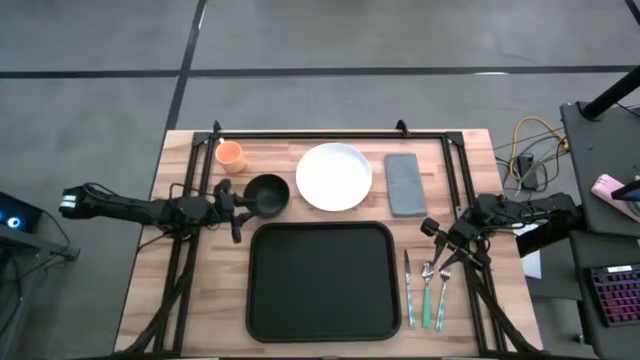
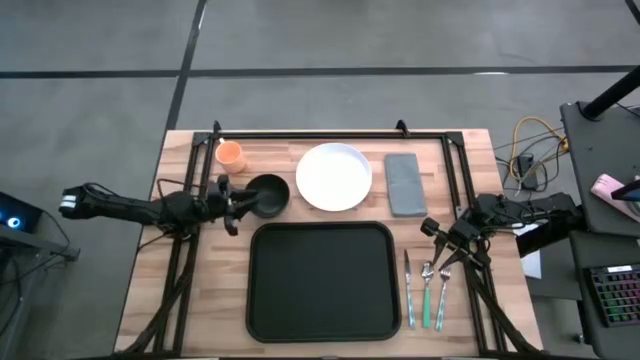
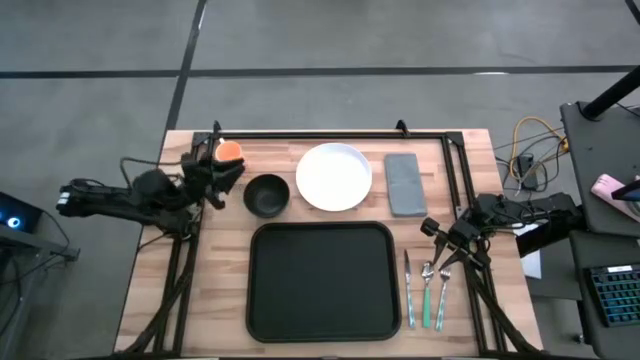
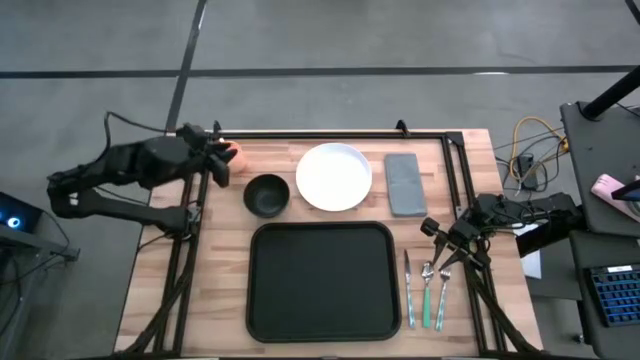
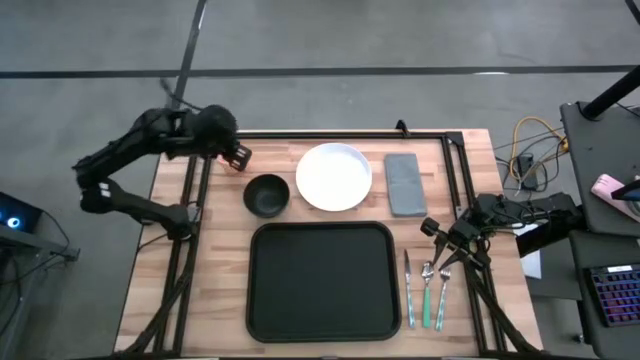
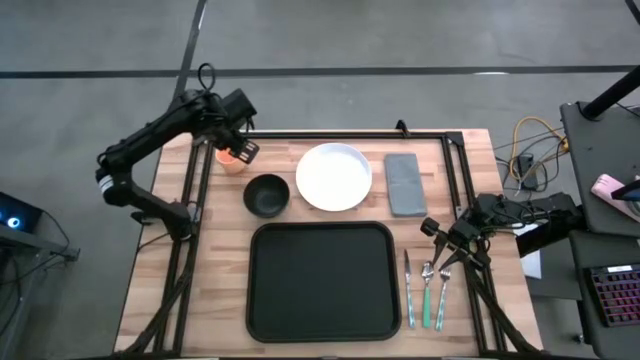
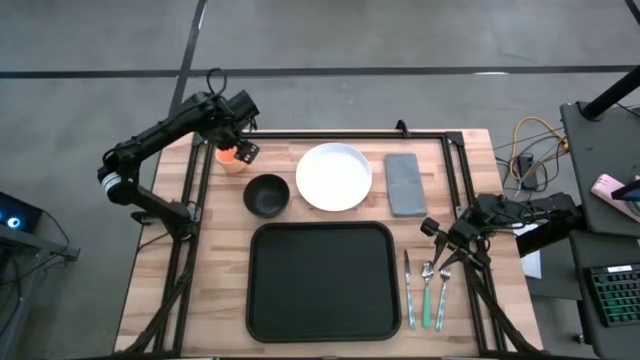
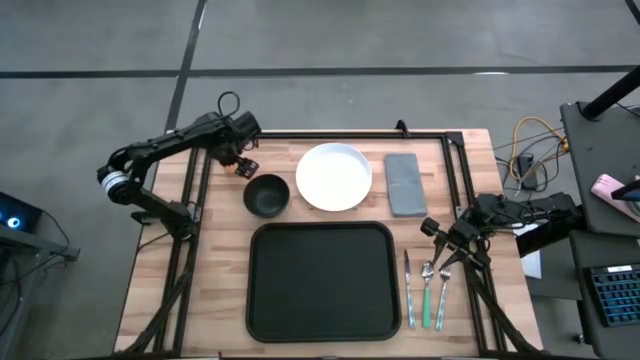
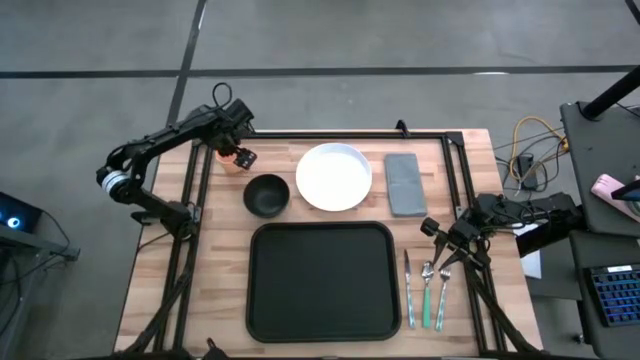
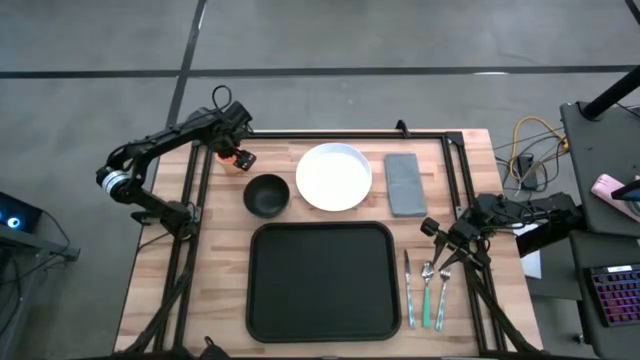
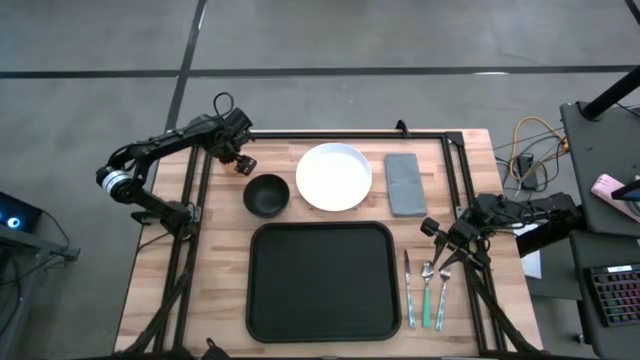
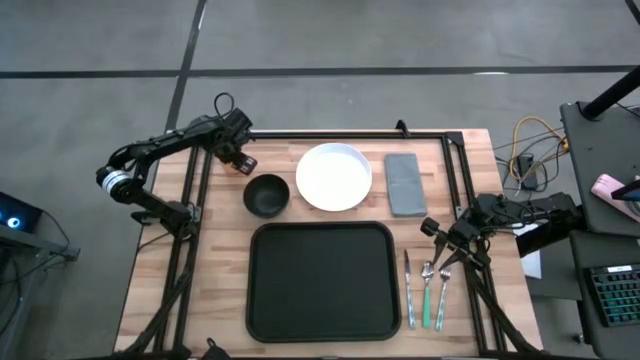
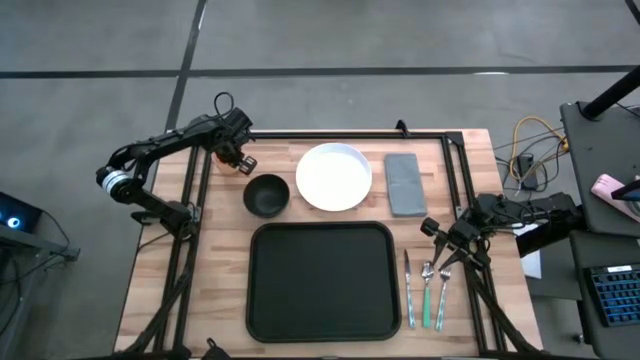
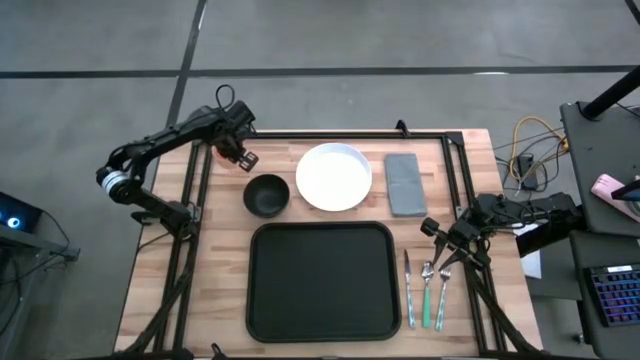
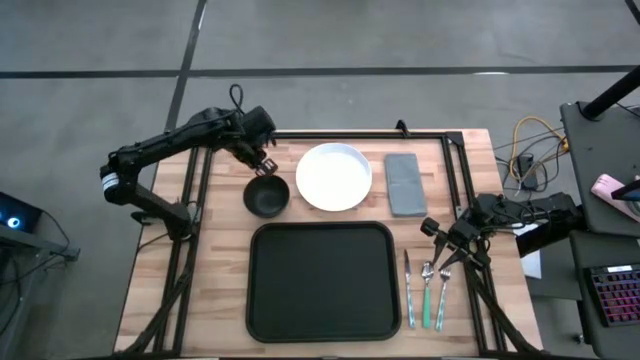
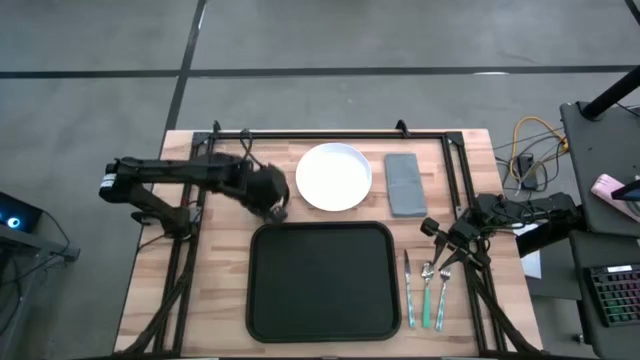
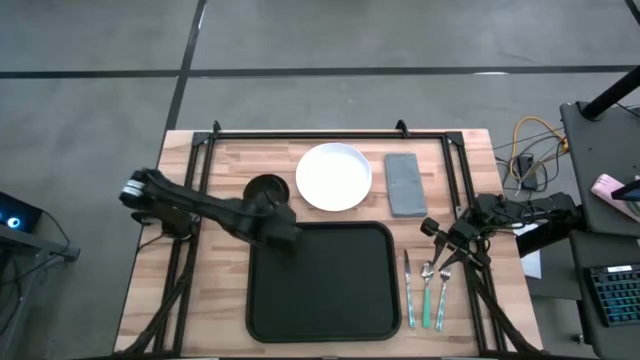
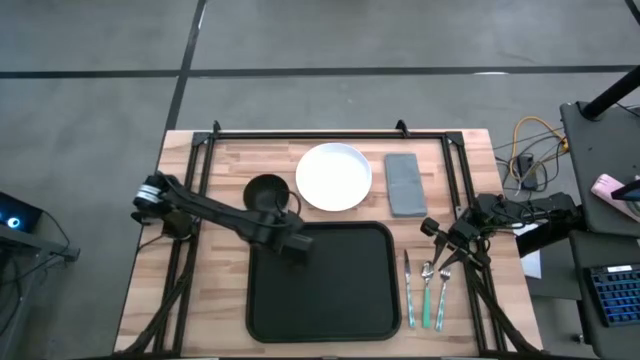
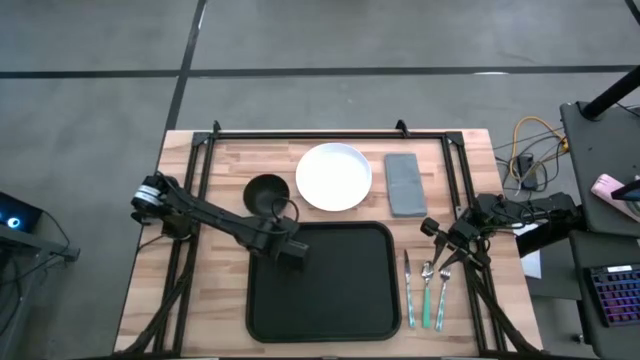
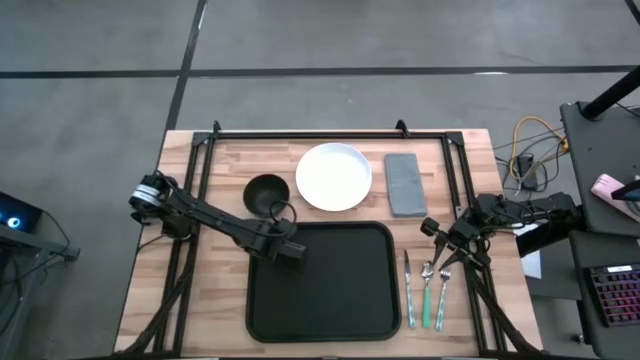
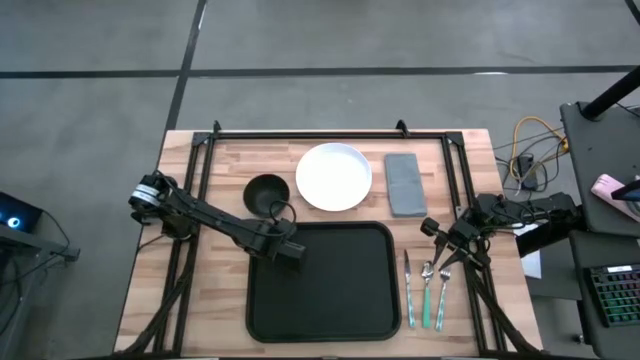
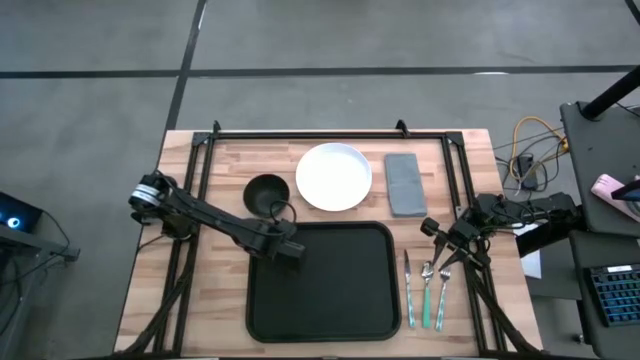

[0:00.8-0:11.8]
Task: Set up tray
Put the orange mug on the top left of the black tray

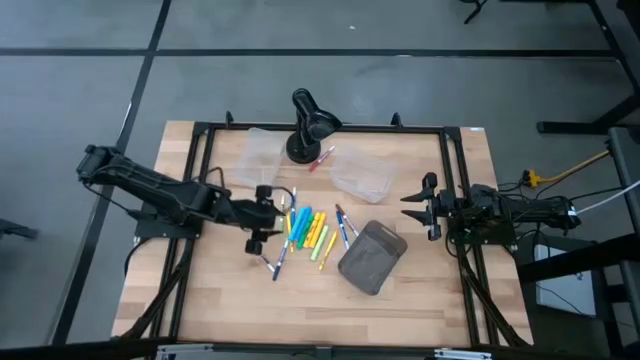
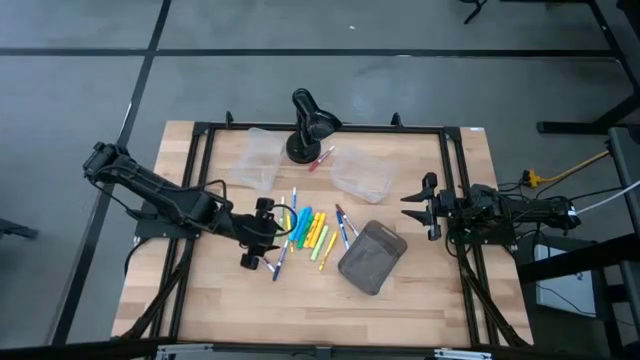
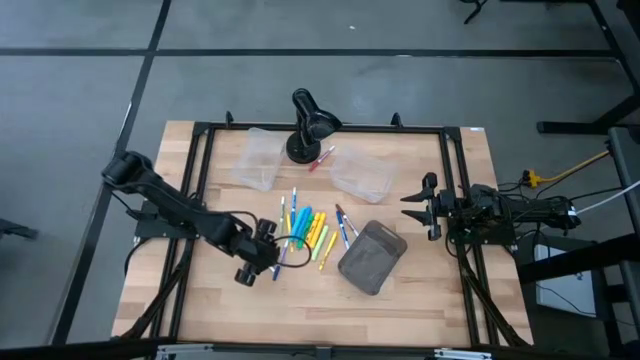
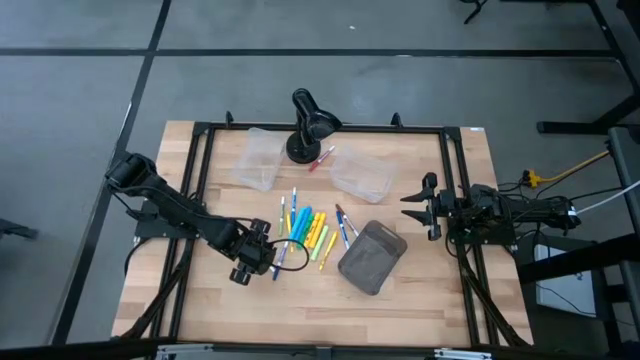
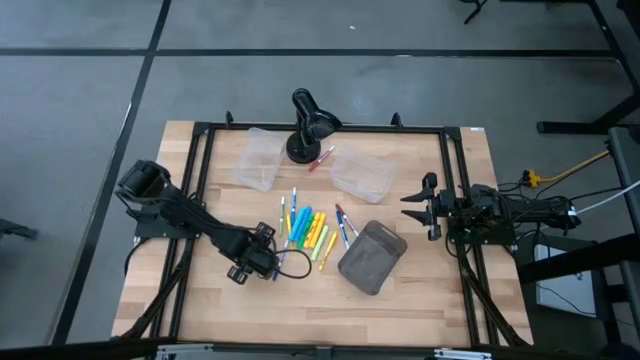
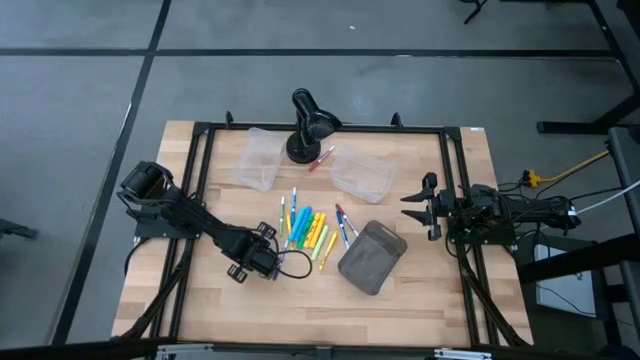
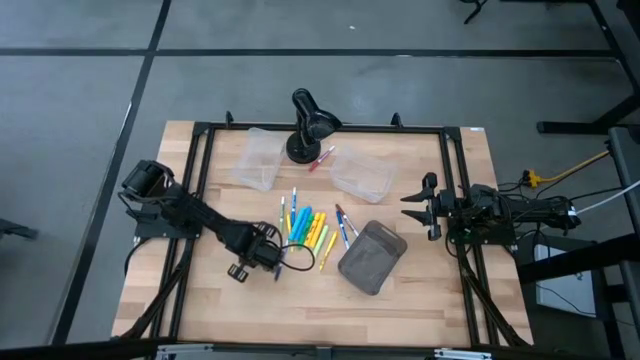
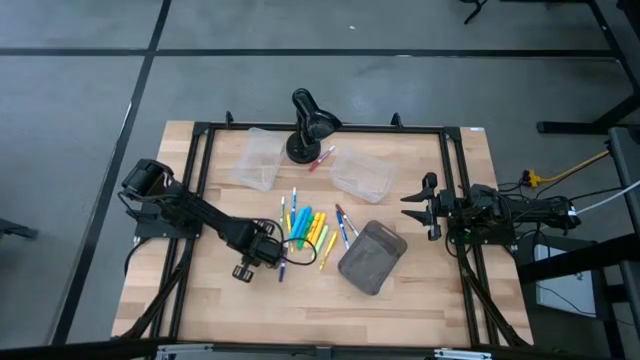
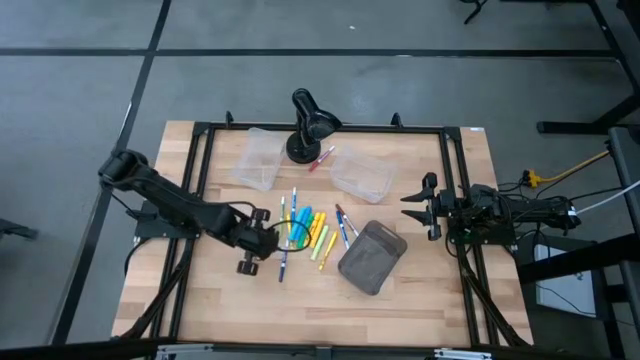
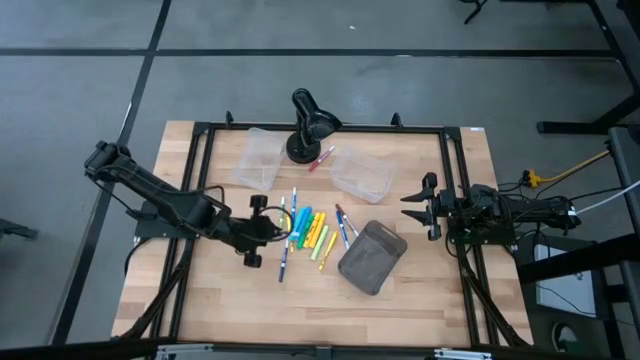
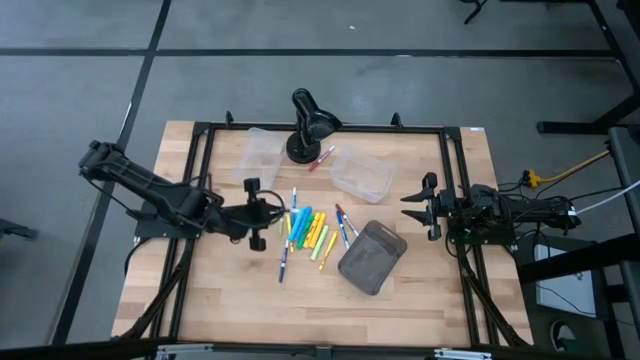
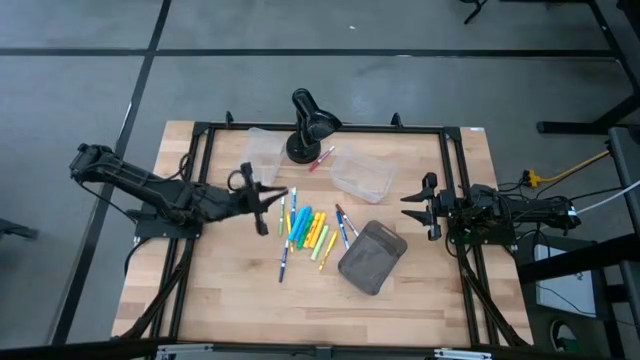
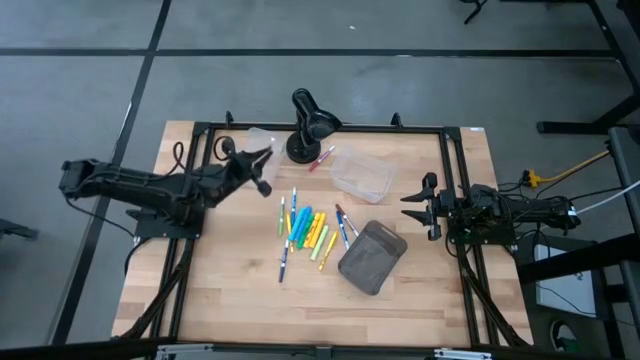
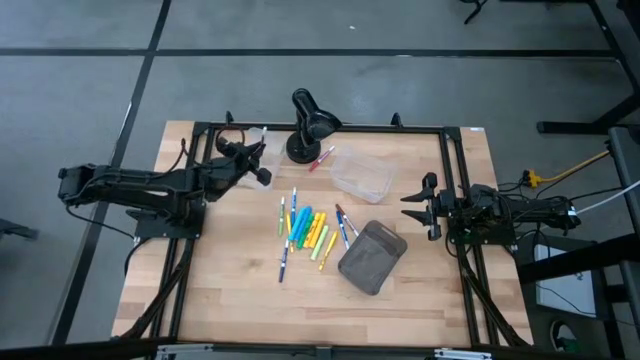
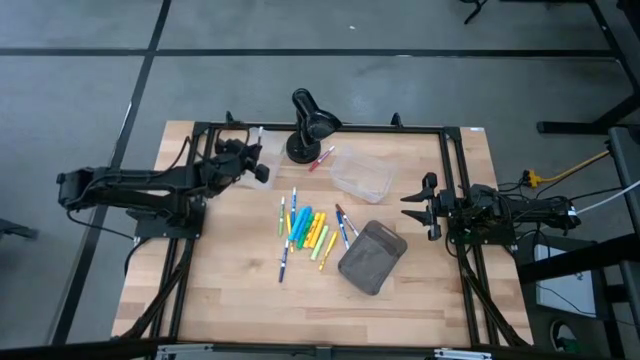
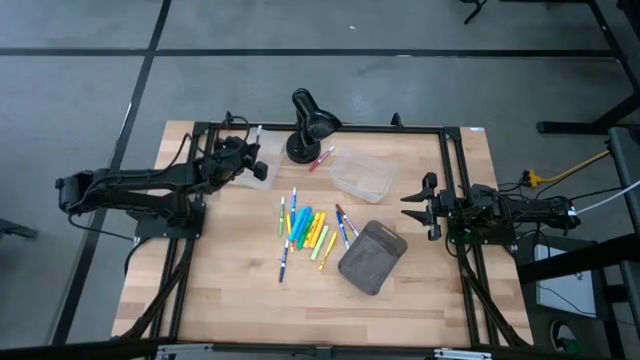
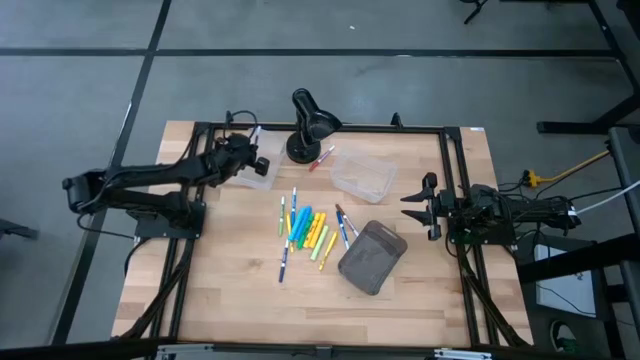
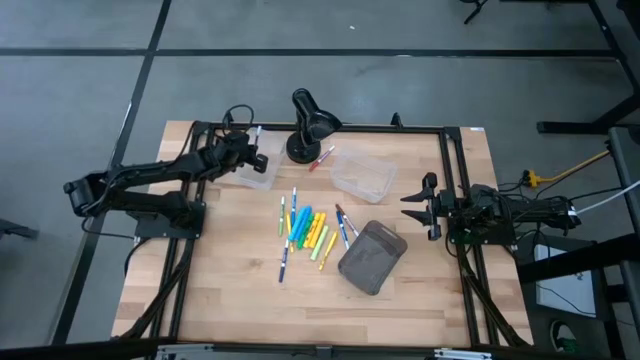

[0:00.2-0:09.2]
Task: Pick & Place Markers
Put the purple marker pen into the left transparent bin
